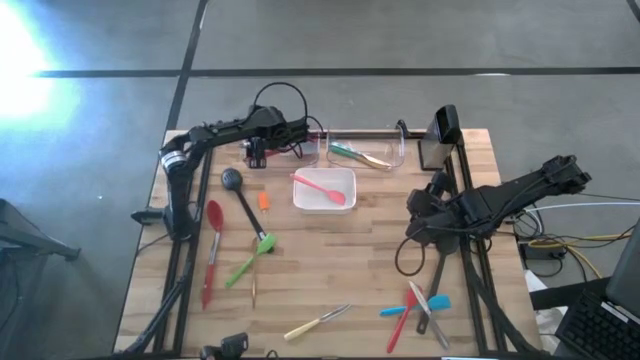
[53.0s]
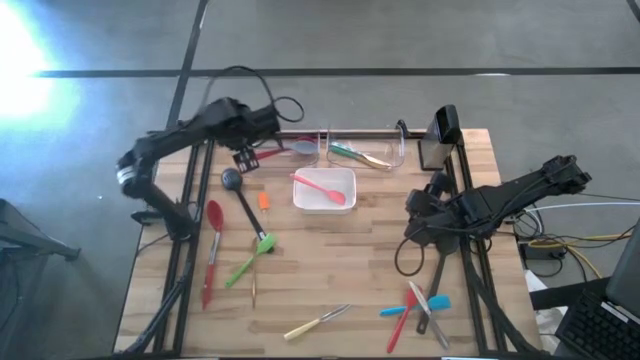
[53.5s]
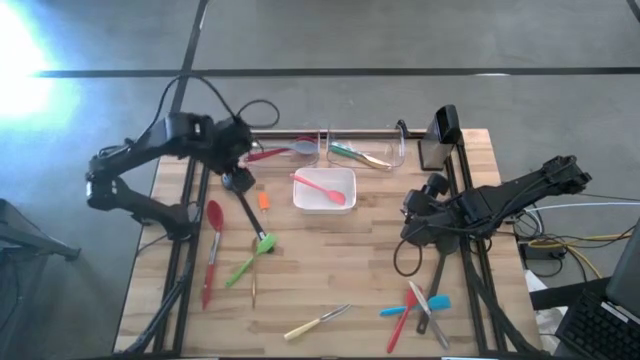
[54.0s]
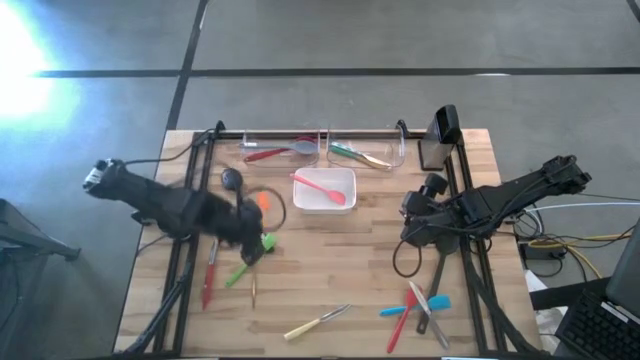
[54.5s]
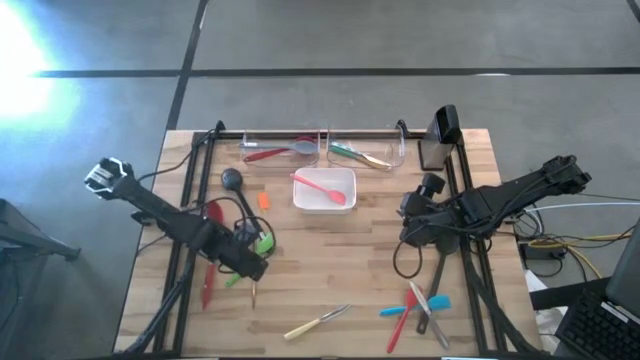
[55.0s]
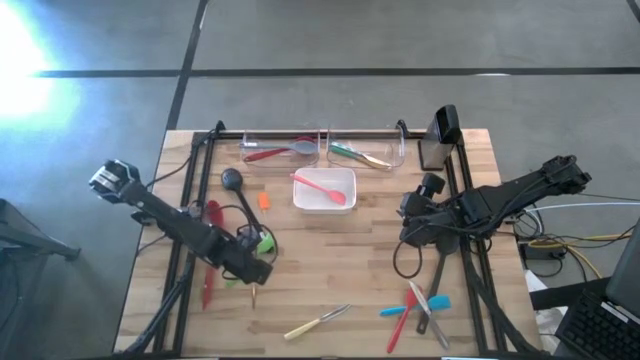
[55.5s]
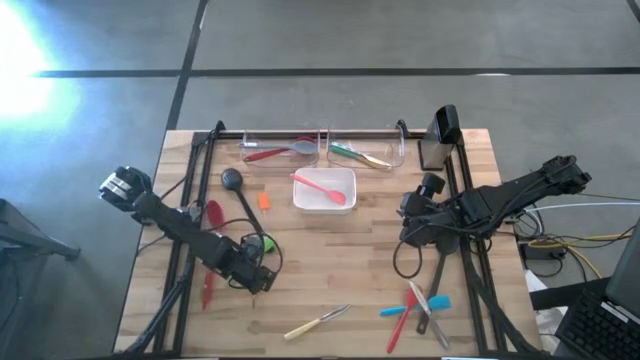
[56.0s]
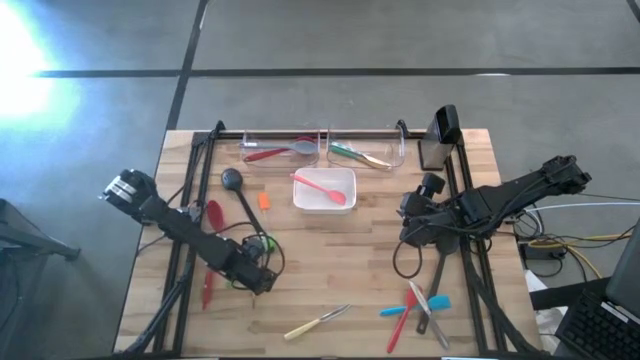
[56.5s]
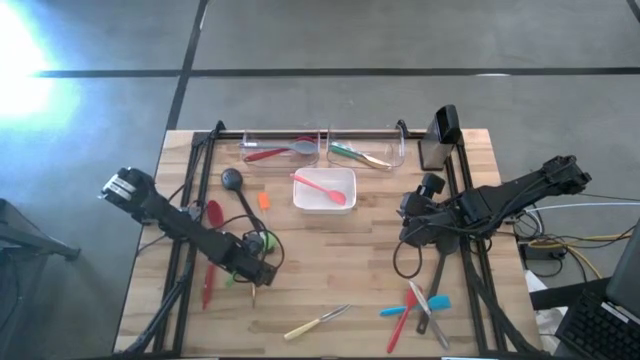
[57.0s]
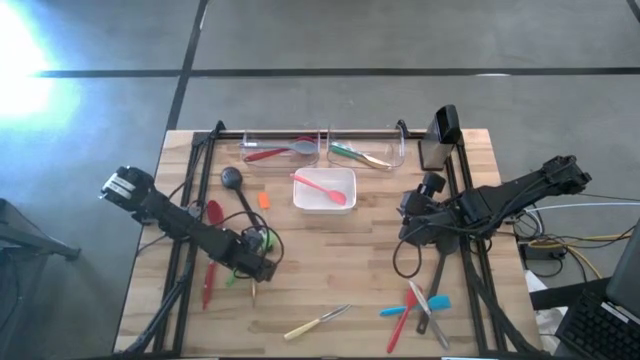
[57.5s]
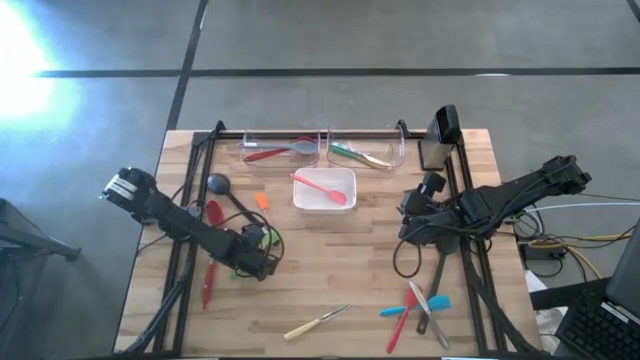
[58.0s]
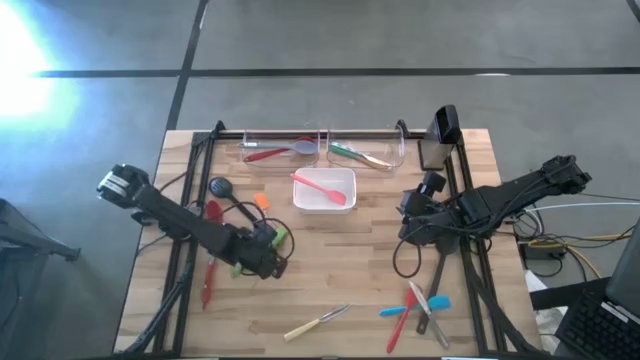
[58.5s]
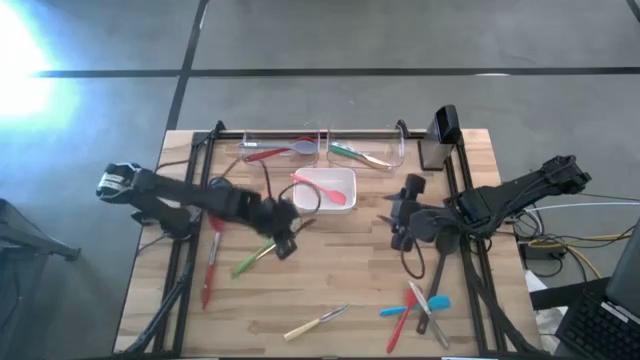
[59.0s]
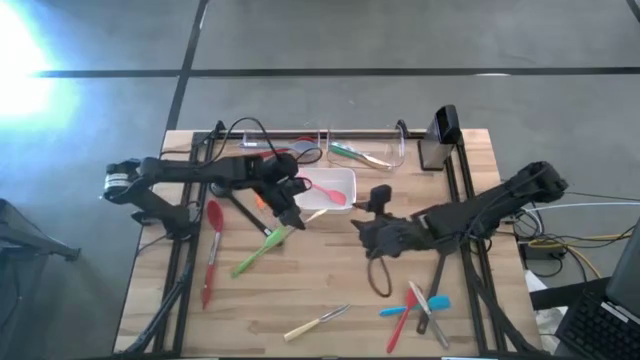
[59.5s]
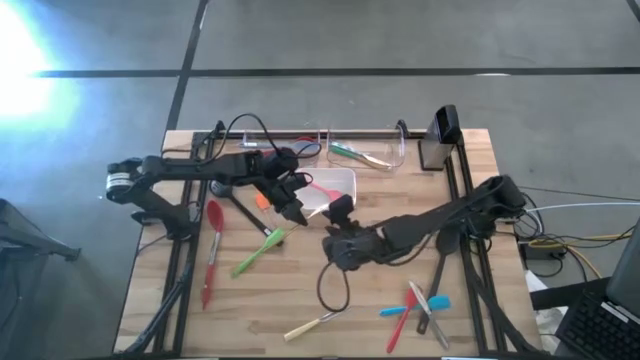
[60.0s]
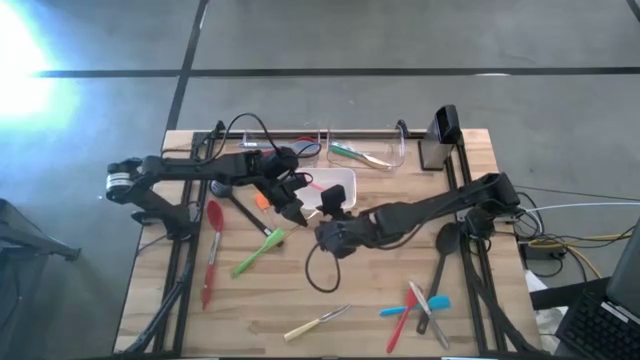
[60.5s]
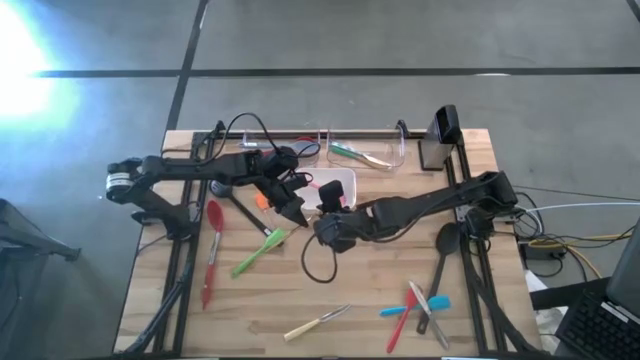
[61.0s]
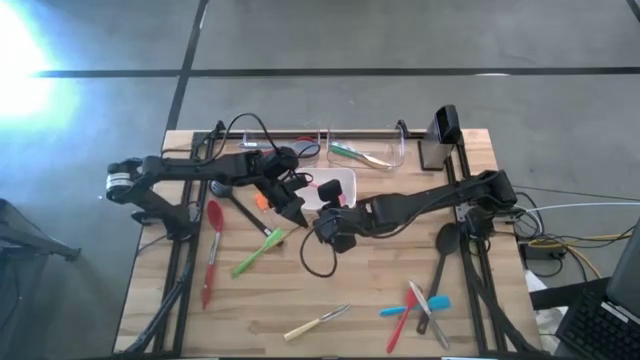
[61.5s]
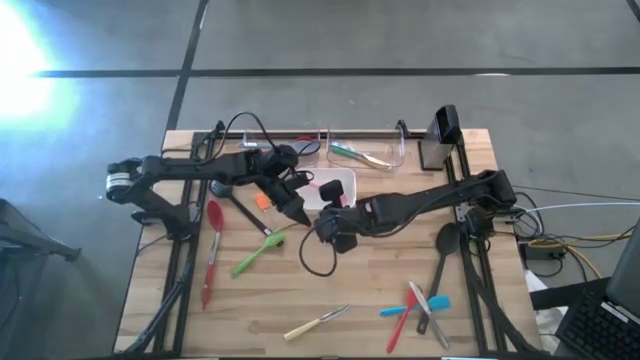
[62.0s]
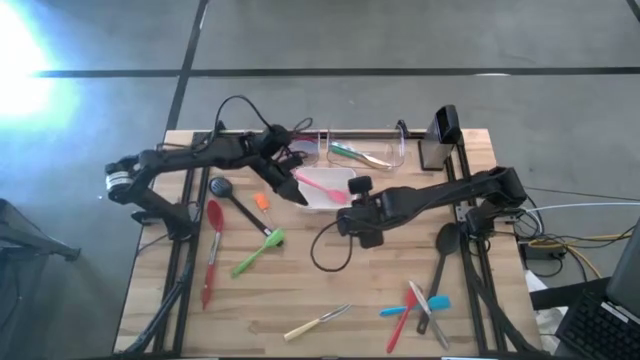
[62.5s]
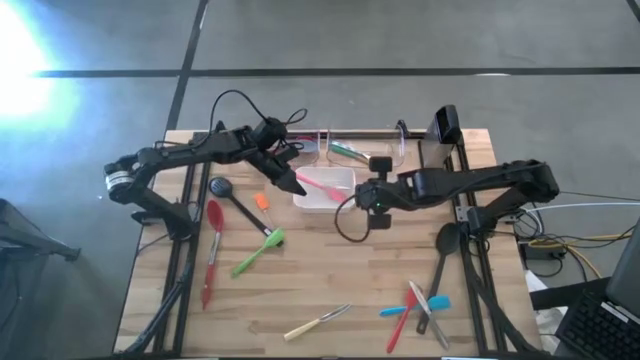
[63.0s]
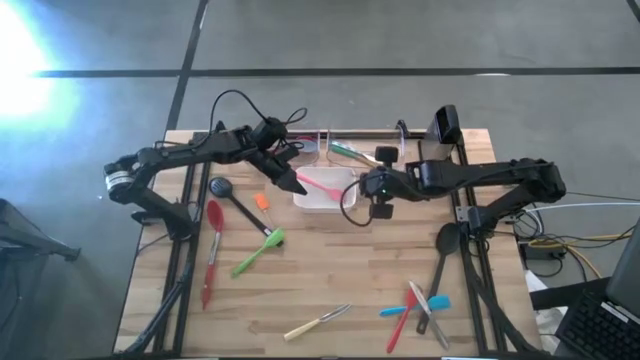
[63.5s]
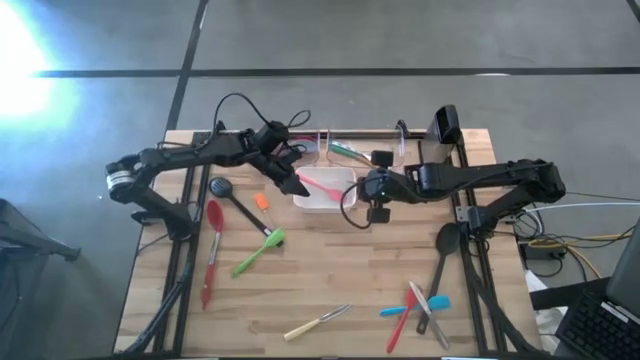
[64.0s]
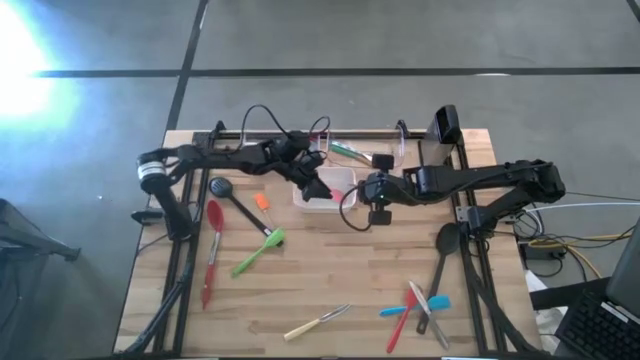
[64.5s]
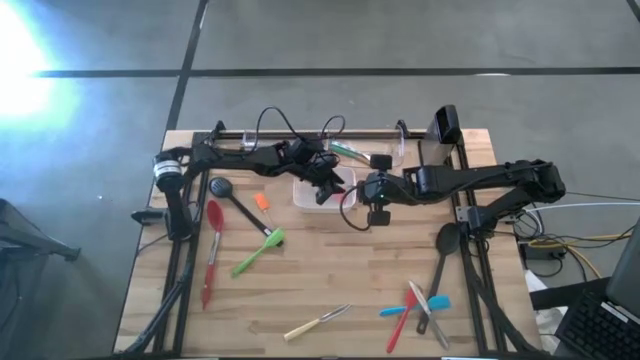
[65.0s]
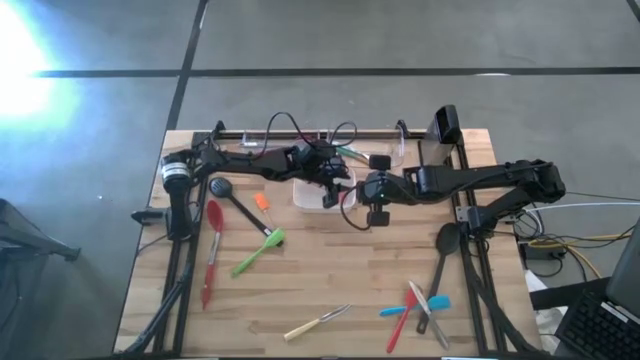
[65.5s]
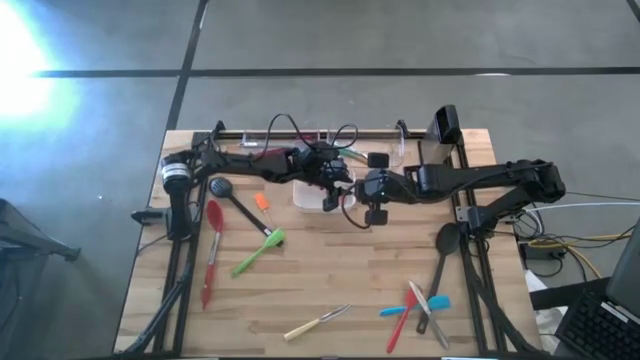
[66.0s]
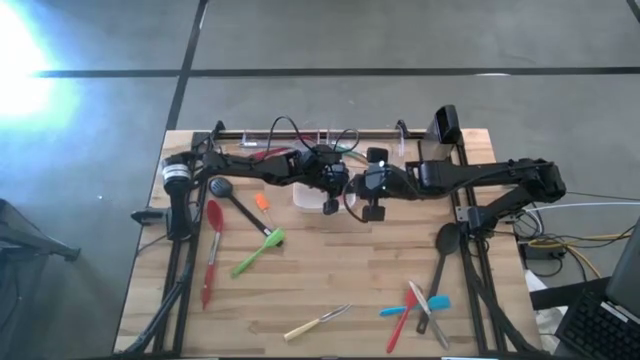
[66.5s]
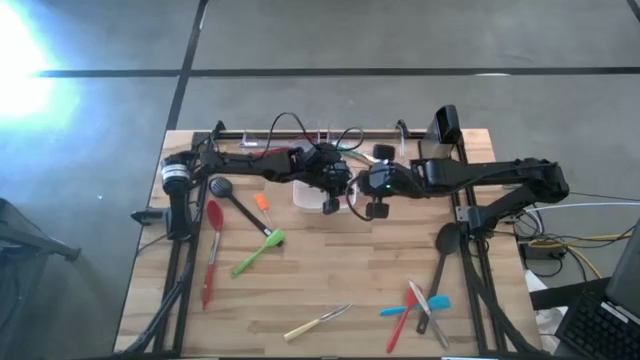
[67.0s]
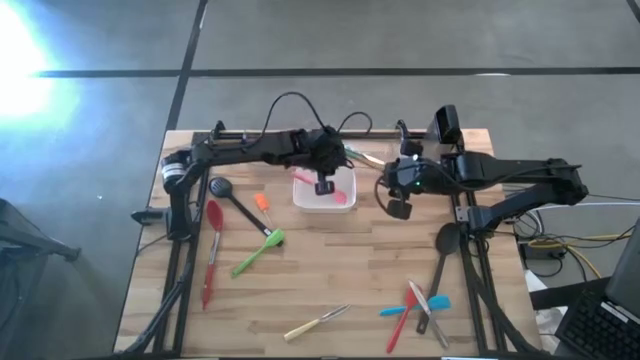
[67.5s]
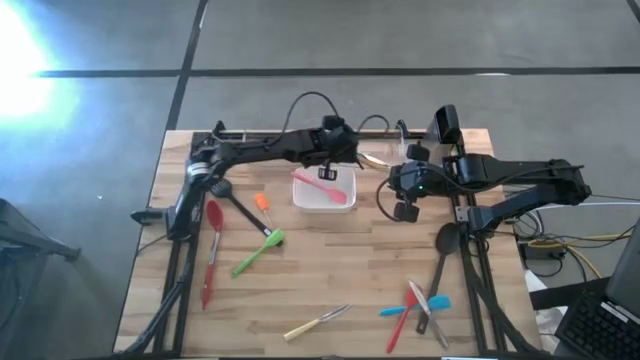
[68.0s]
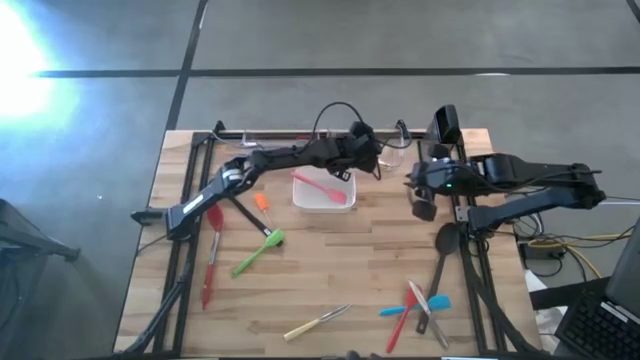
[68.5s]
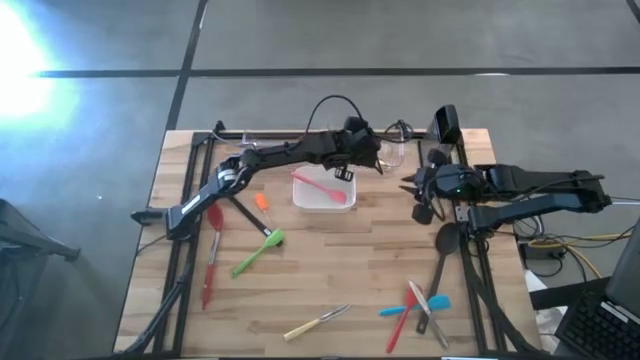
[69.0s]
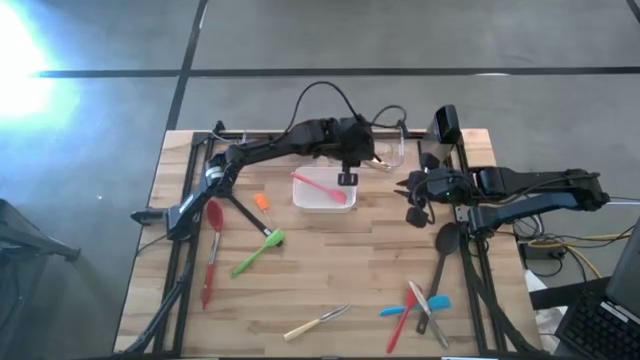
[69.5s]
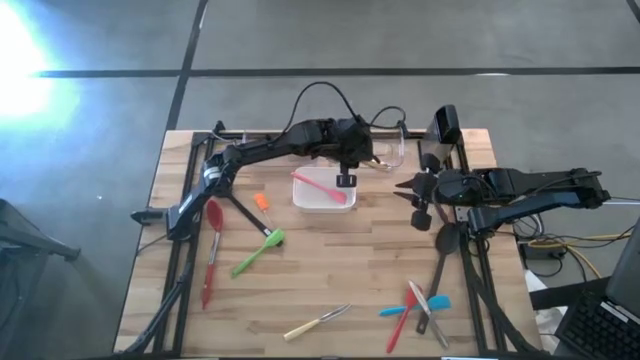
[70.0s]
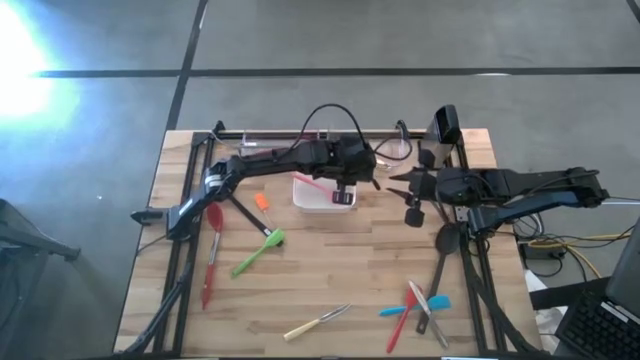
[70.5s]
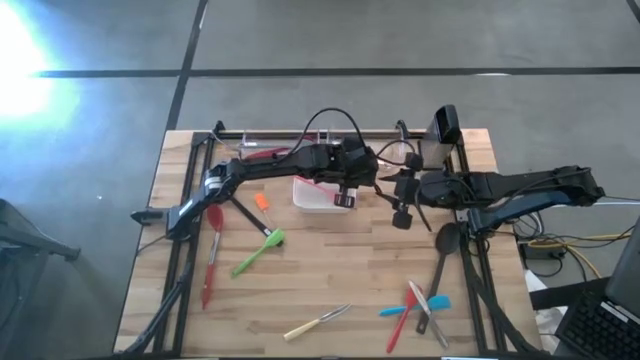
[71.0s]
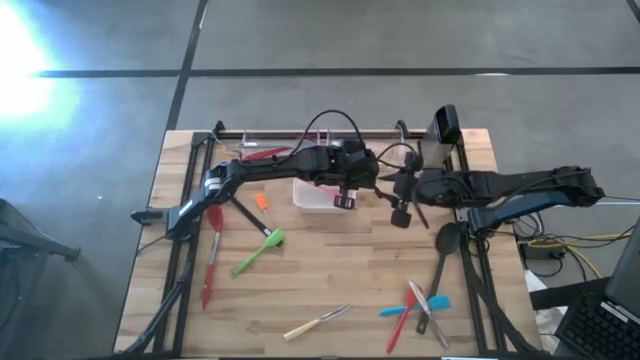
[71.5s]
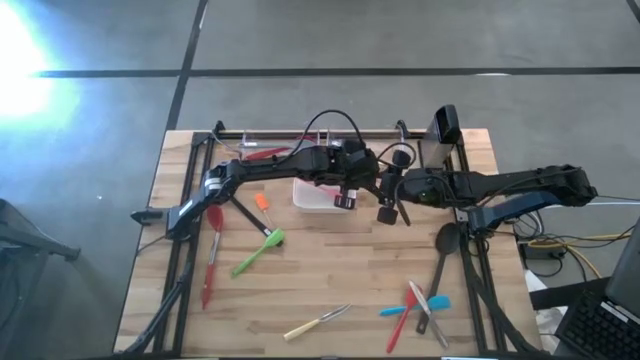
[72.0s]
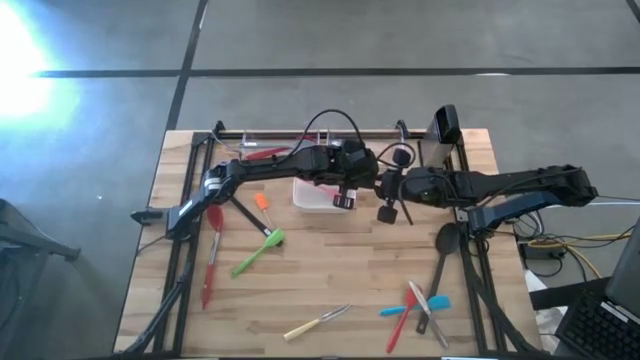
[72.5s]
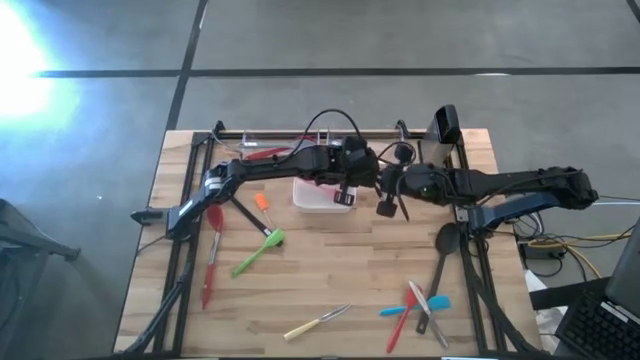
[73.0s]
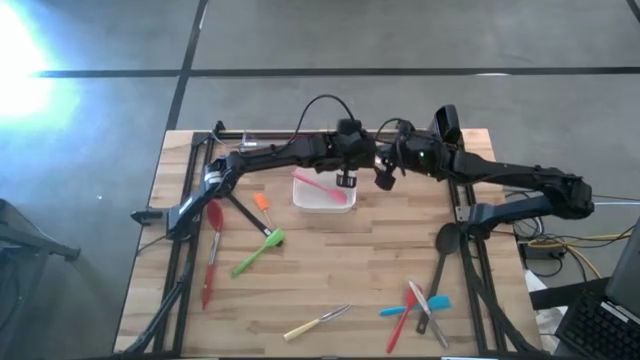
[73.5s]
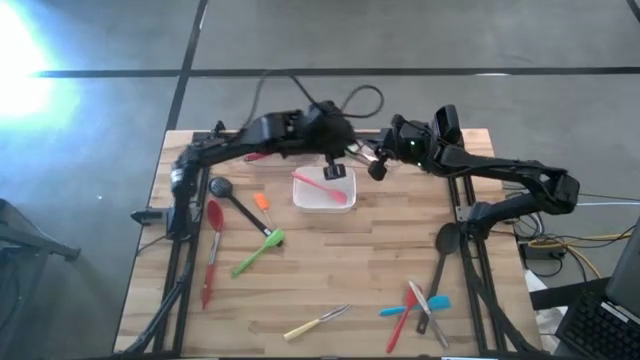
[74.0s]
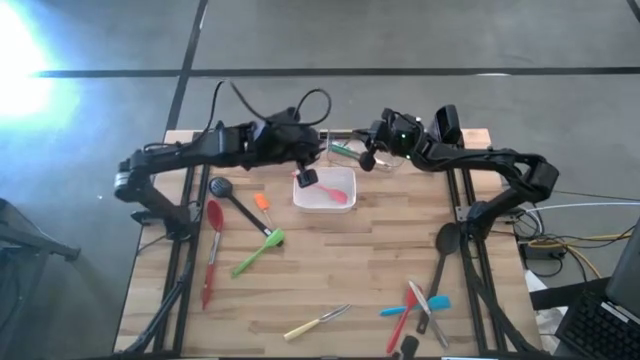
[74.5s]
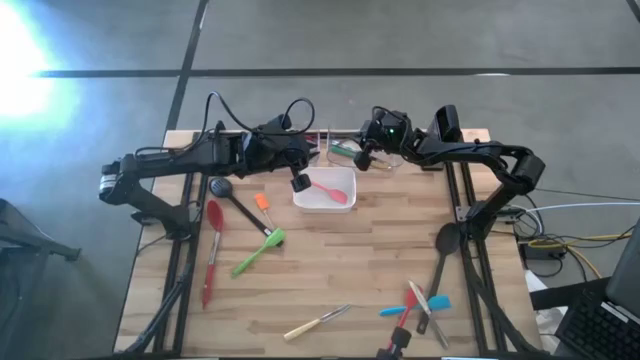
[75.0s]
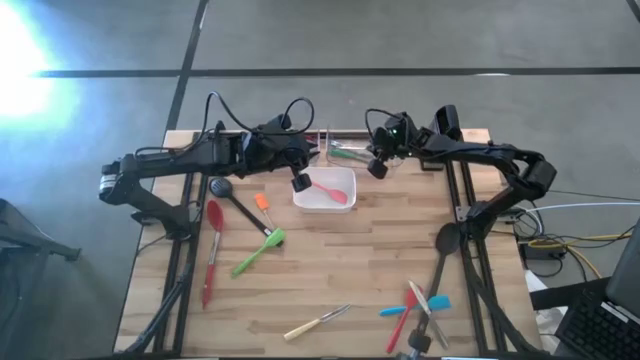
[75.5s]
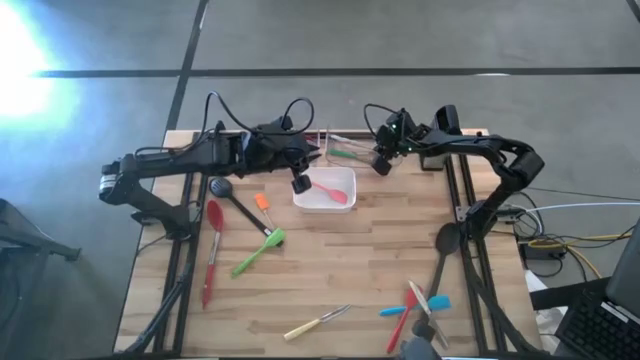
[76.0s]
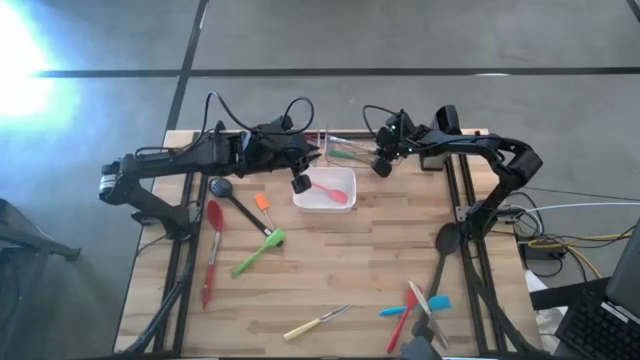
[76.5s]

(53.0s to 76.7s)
Task: Pick & Place Kitchen Items
Put the gold table knife into the right transparent bin
